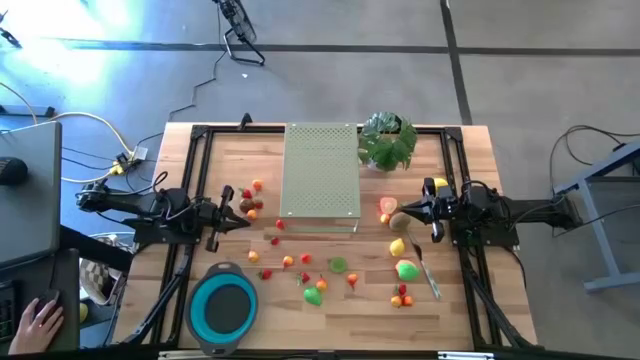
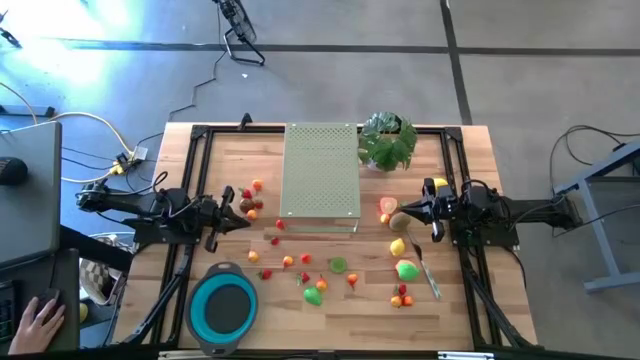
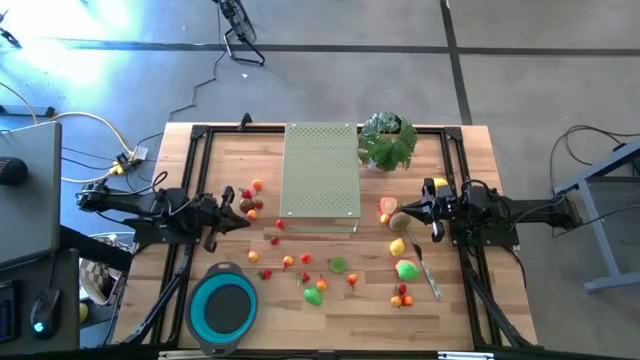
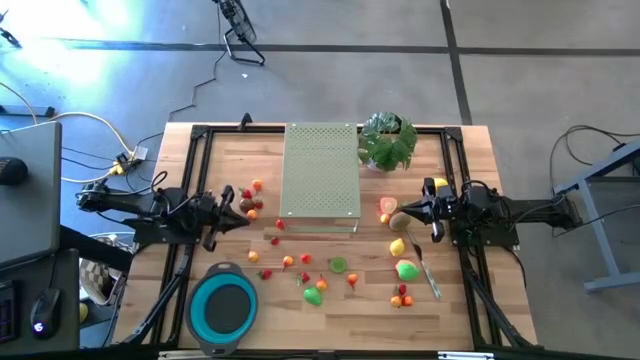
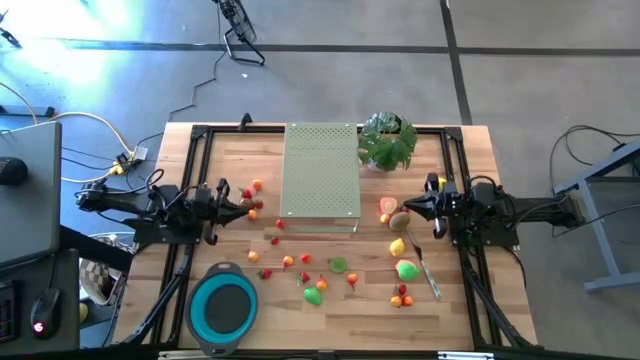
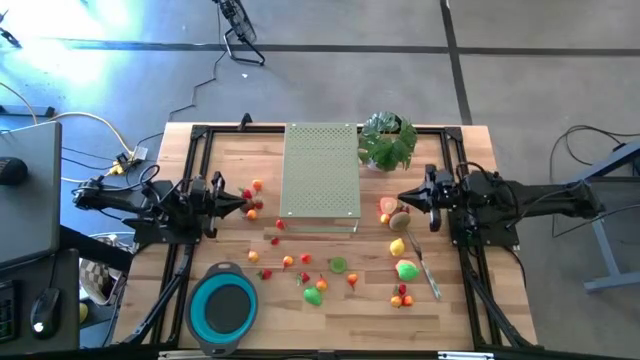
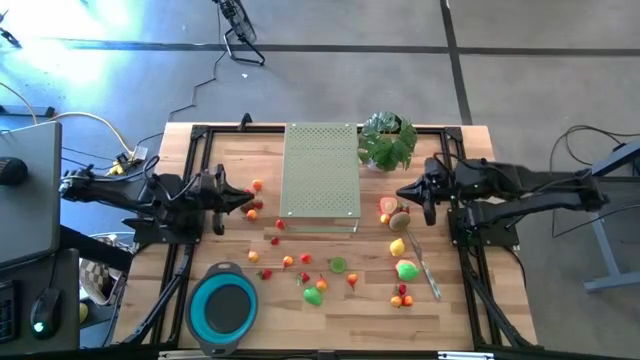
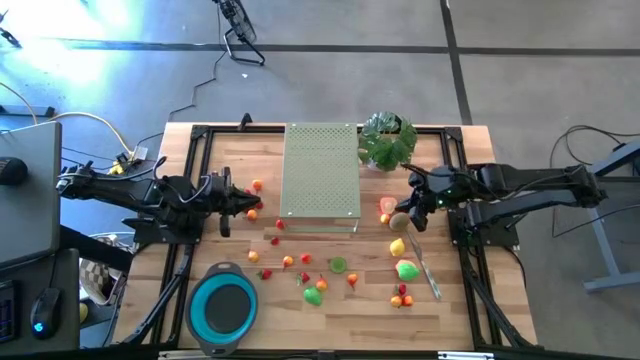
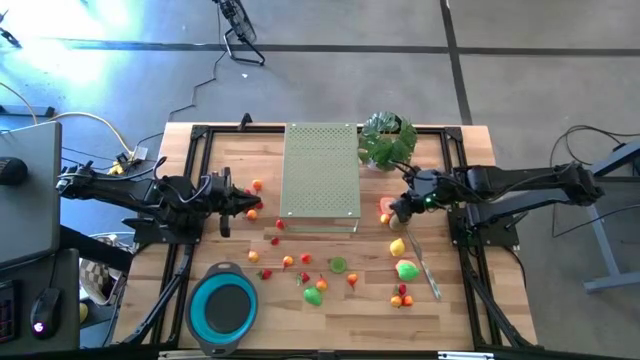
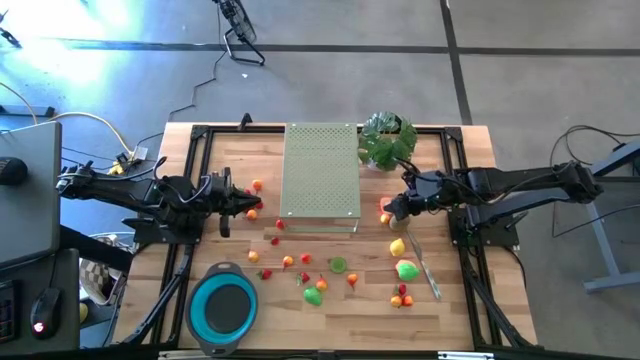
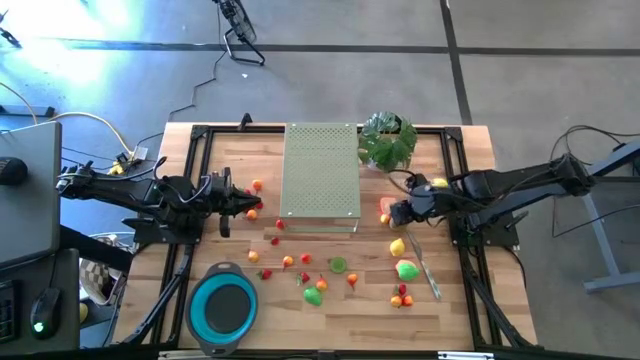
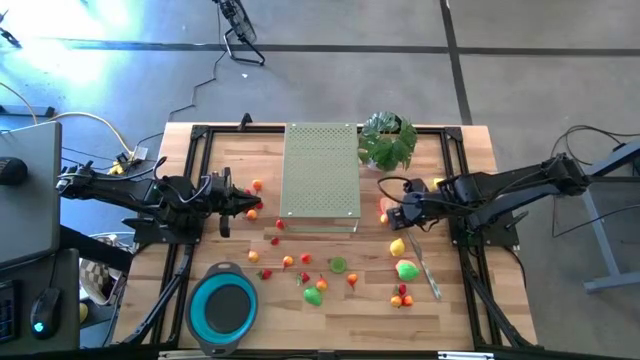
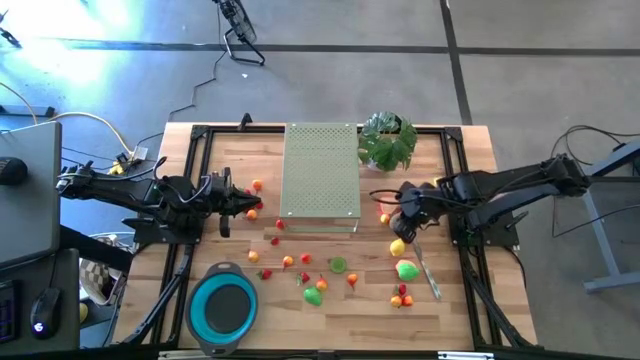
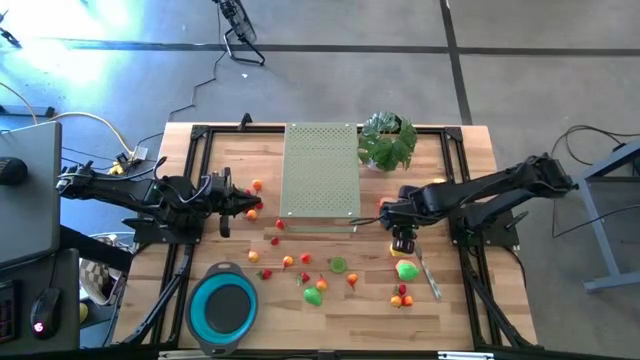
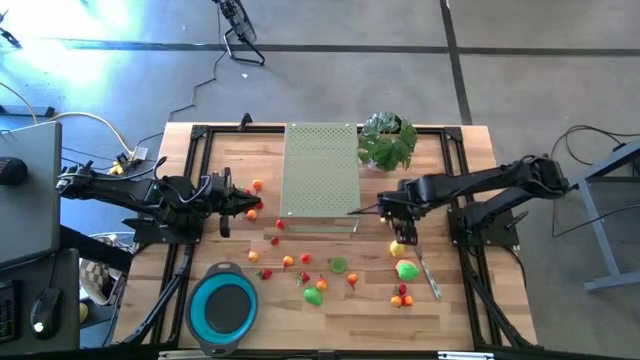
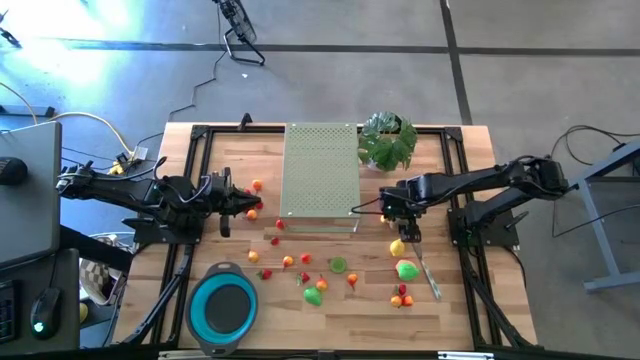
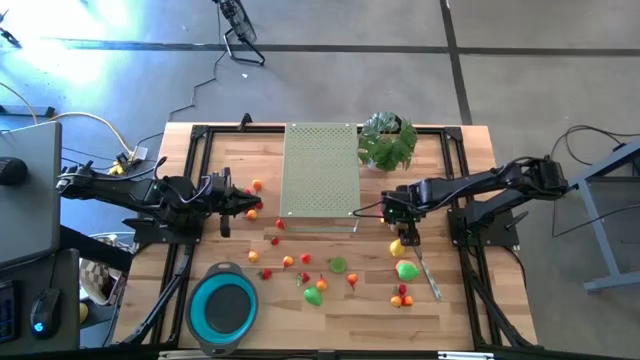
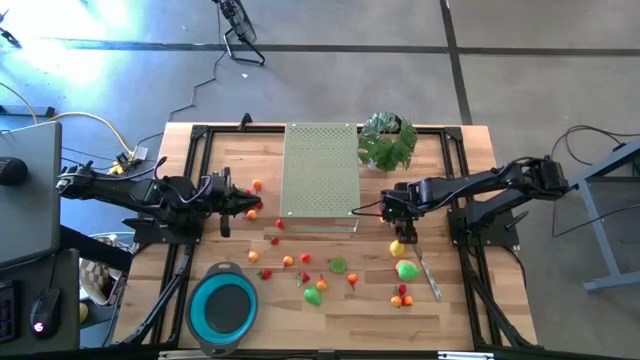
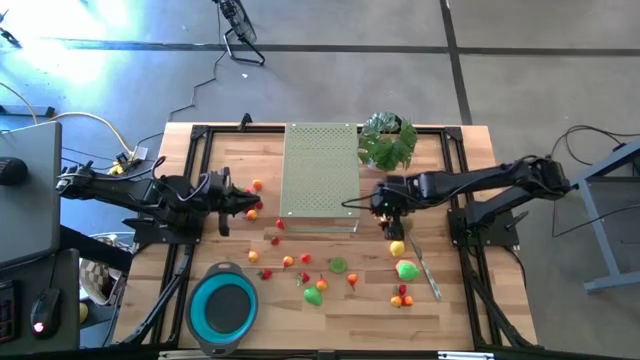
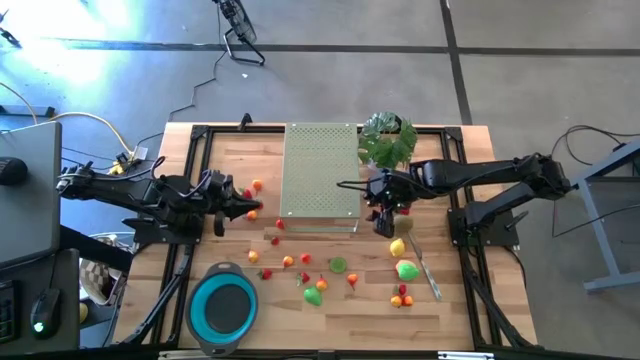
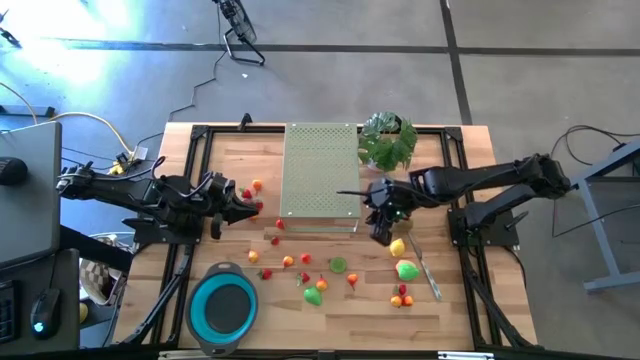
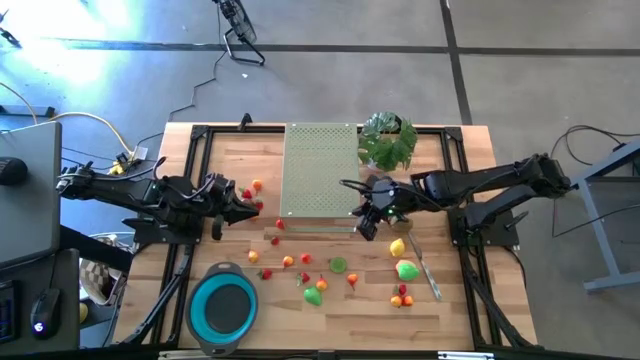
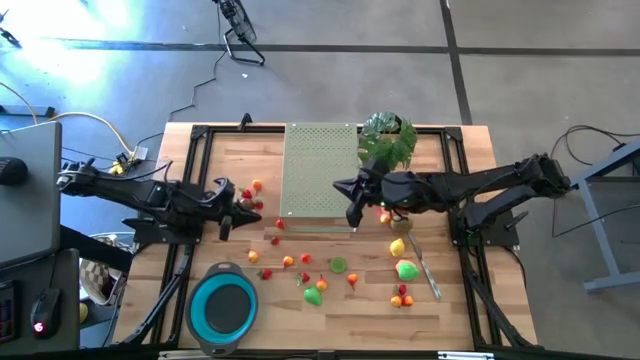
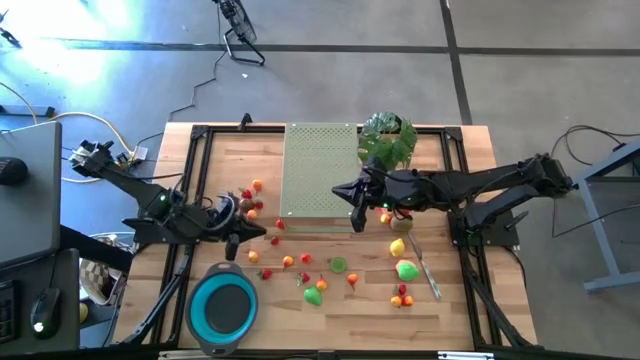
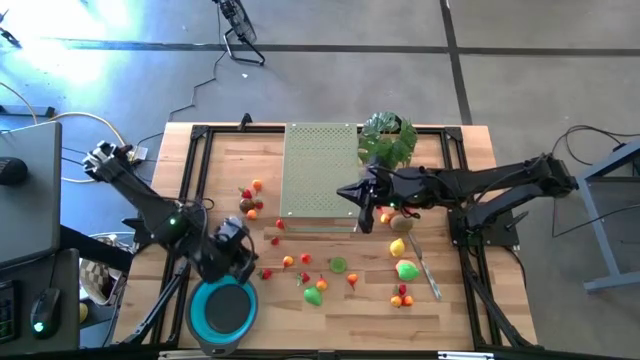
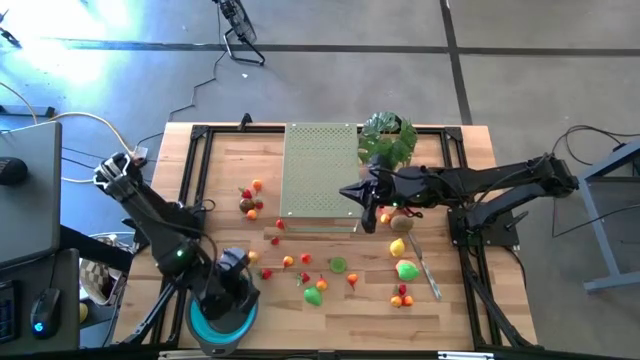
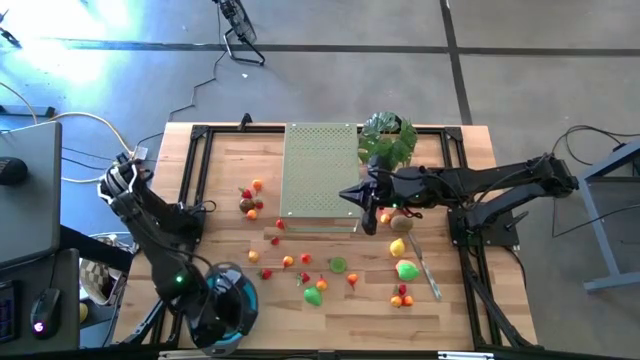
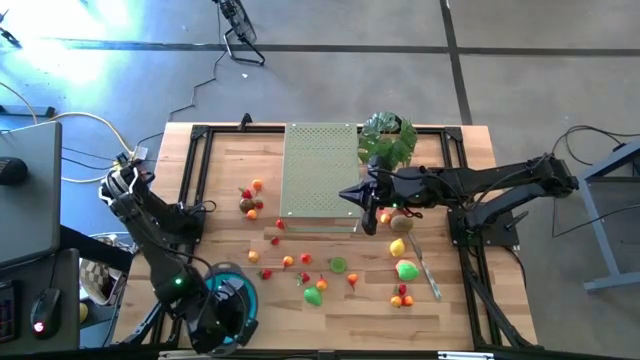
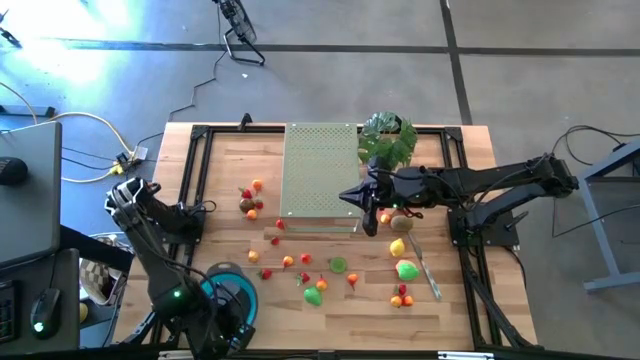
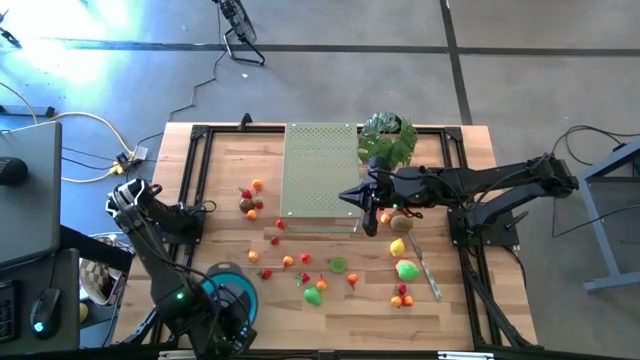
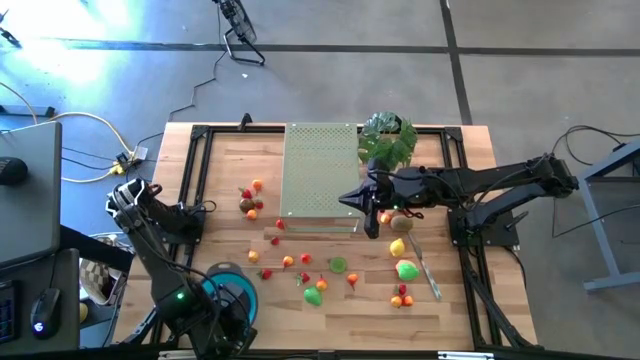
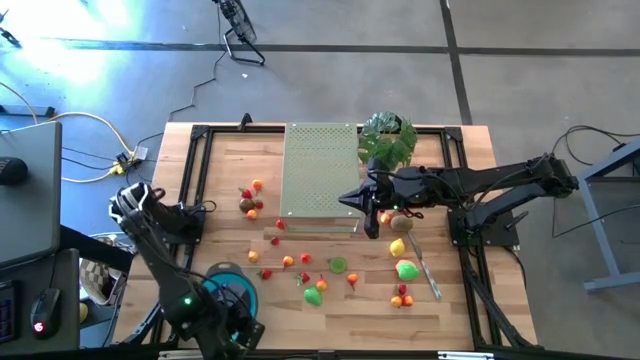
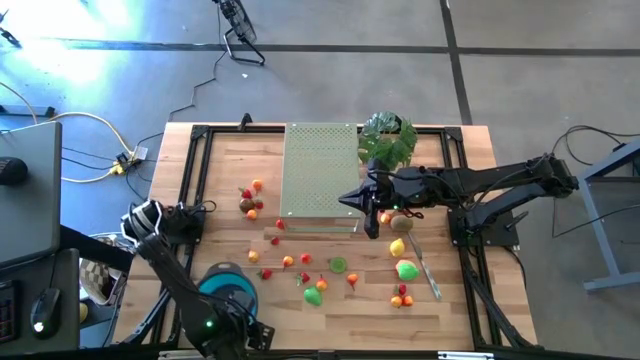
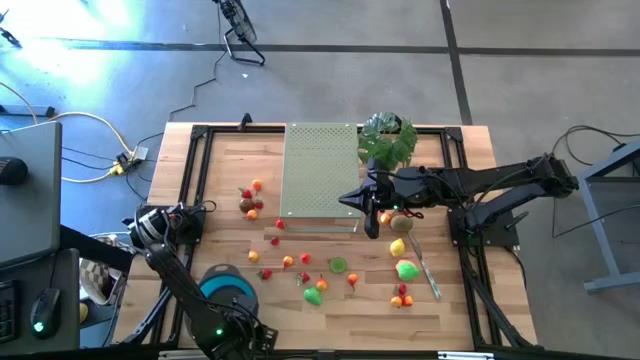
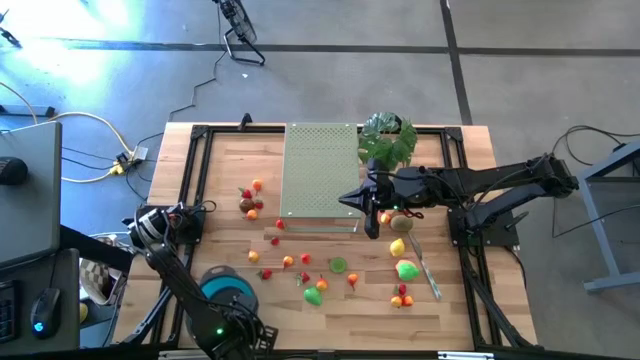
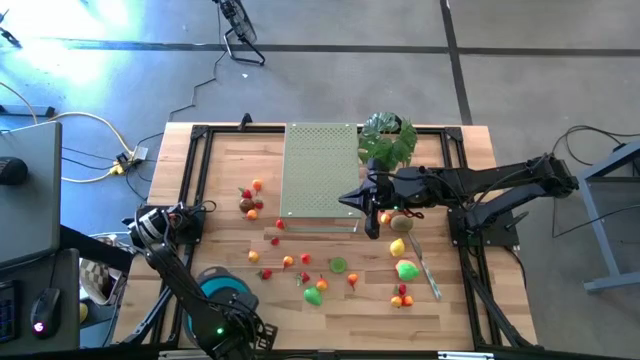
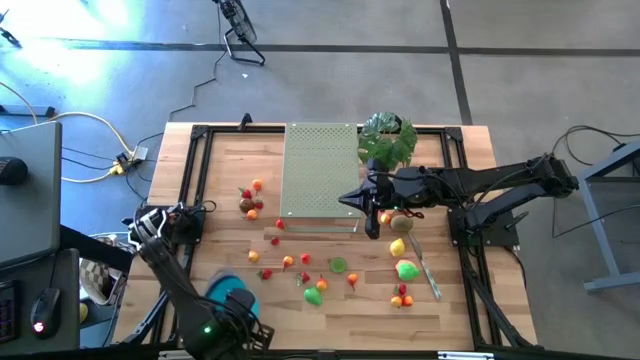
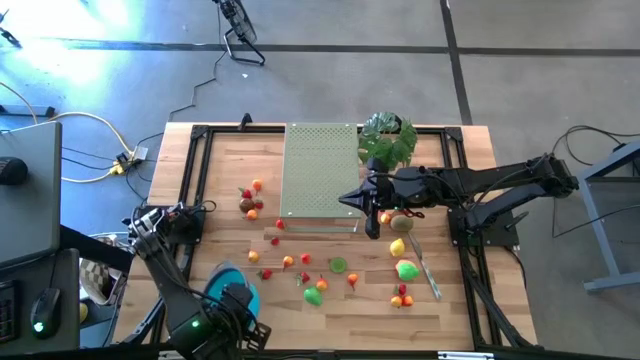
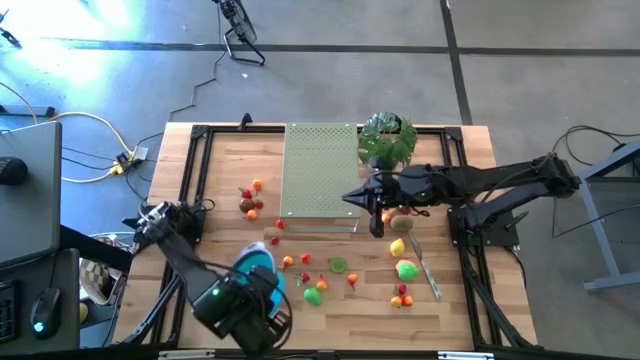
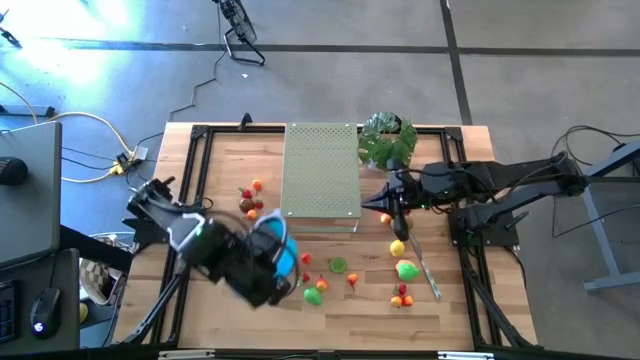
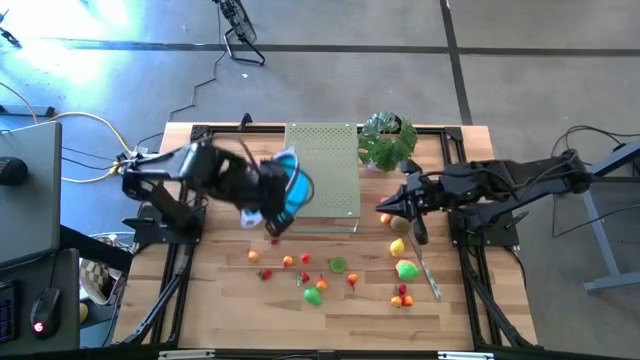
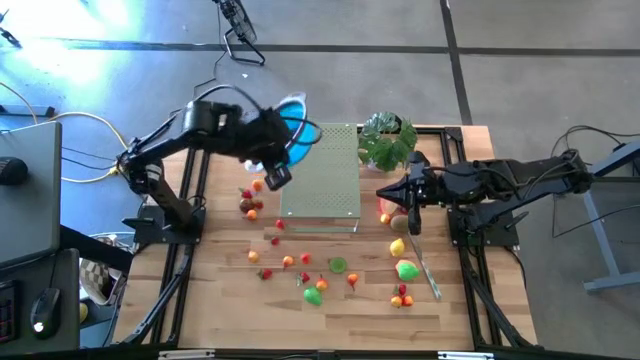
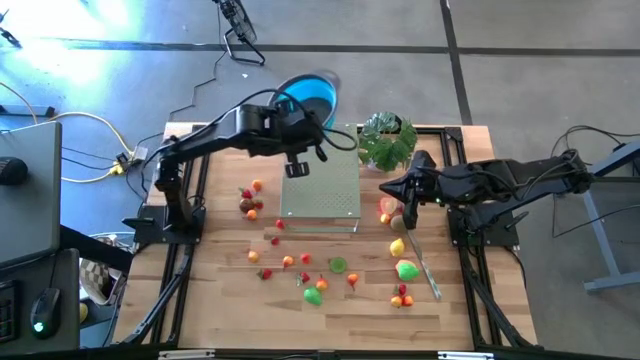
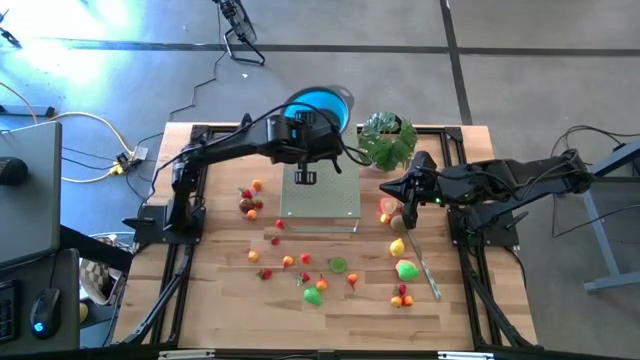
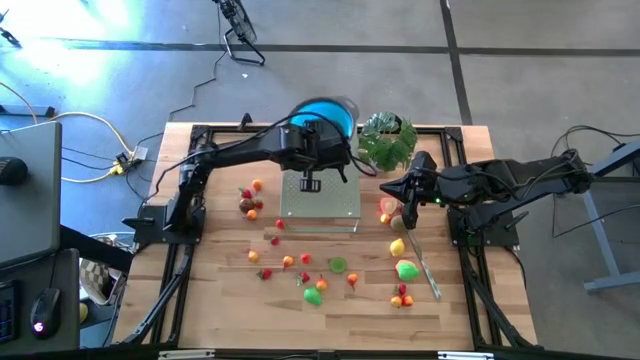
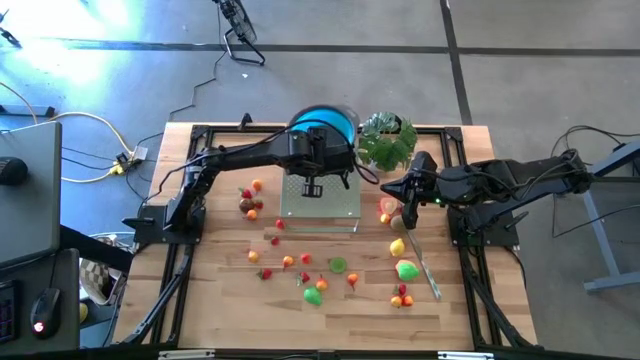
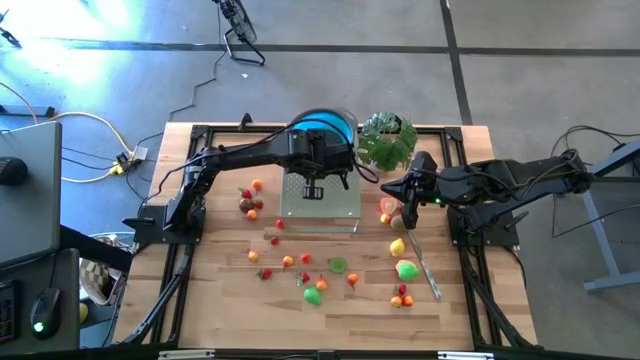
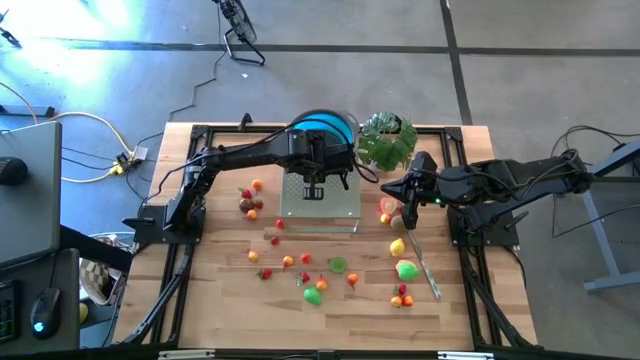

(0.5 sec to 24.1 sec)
Task: Pick & Place Fruit
Put the blue bowl on the shelf
